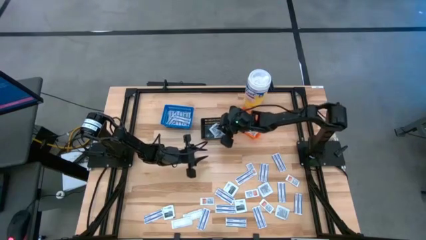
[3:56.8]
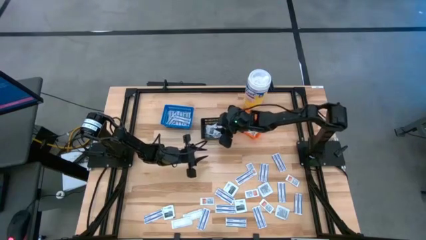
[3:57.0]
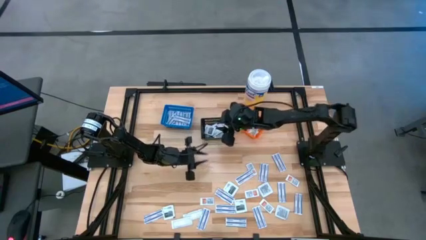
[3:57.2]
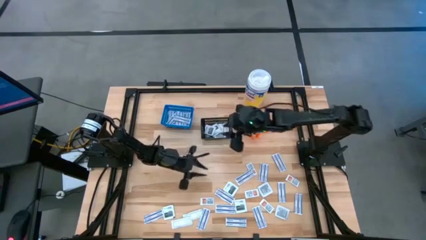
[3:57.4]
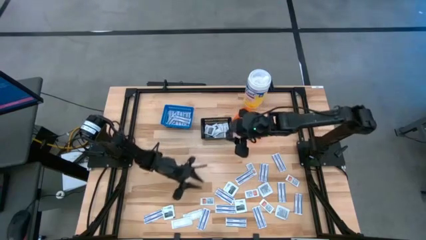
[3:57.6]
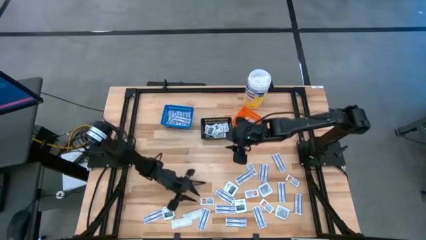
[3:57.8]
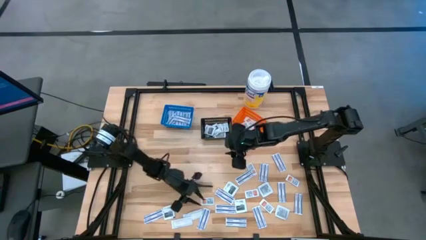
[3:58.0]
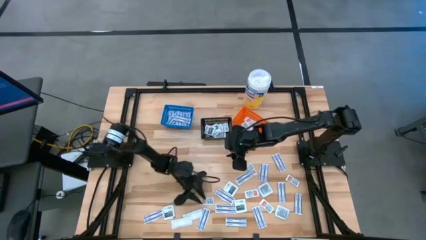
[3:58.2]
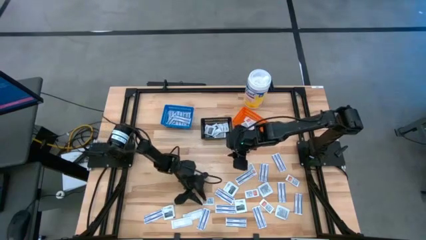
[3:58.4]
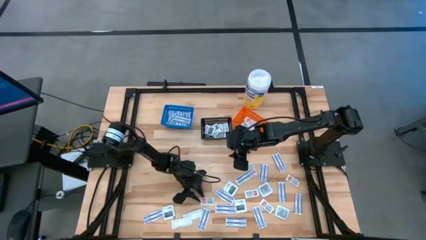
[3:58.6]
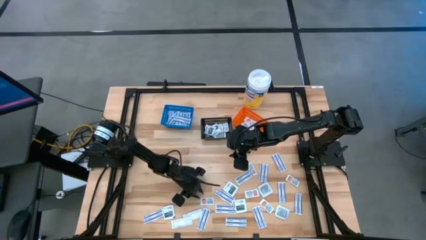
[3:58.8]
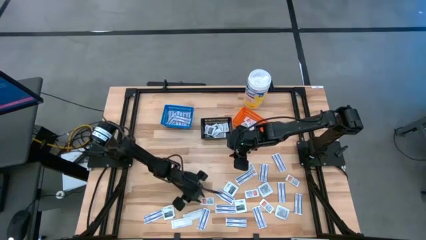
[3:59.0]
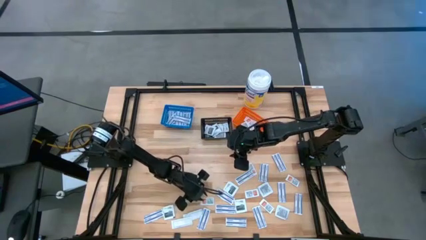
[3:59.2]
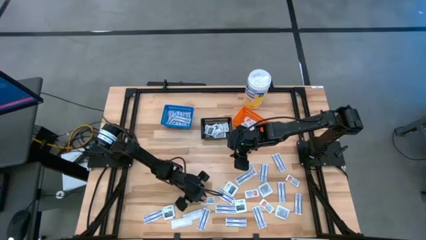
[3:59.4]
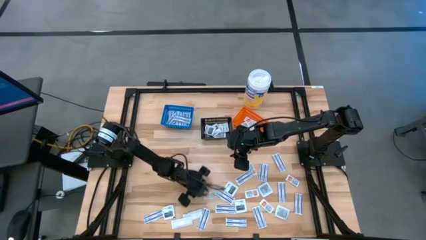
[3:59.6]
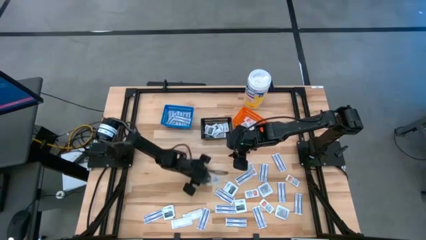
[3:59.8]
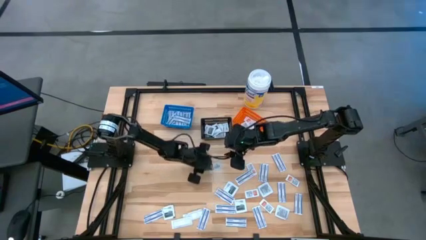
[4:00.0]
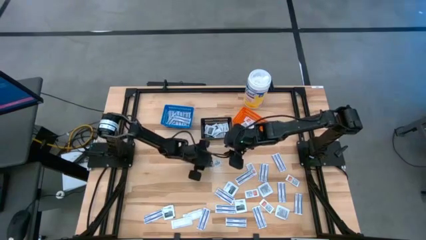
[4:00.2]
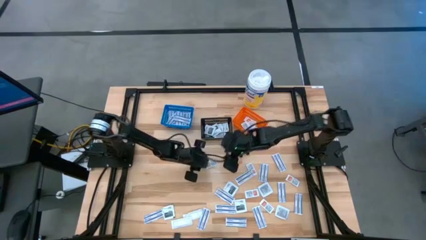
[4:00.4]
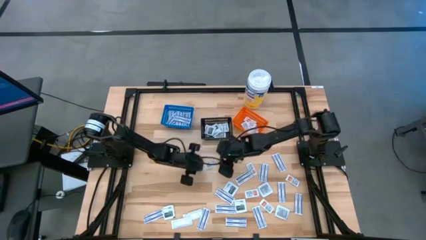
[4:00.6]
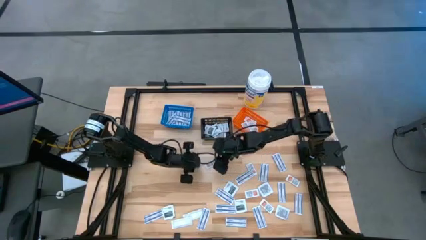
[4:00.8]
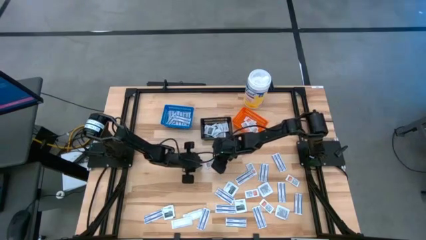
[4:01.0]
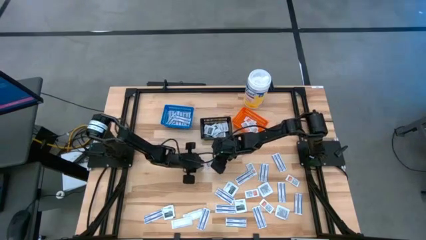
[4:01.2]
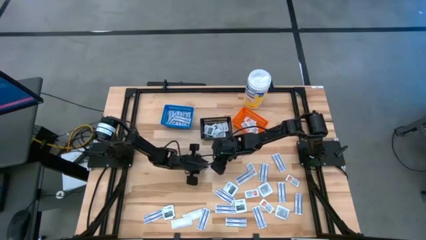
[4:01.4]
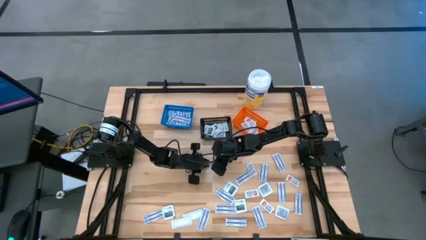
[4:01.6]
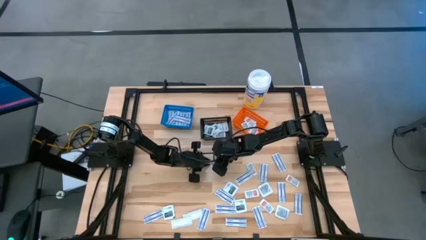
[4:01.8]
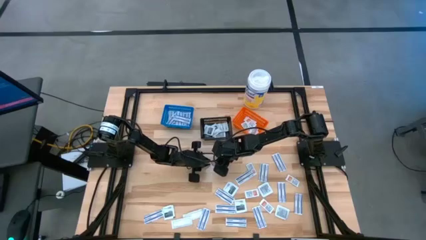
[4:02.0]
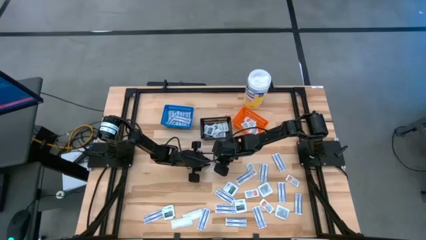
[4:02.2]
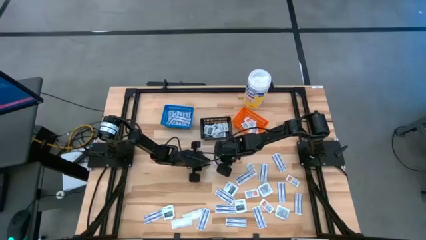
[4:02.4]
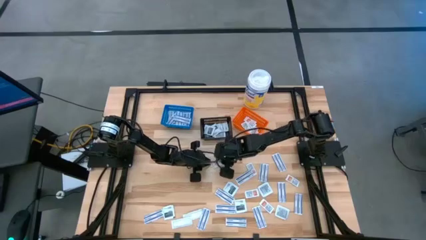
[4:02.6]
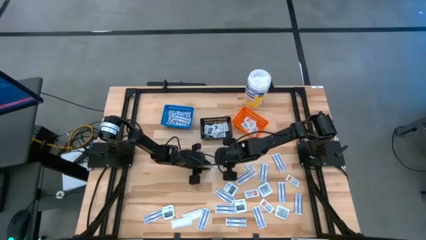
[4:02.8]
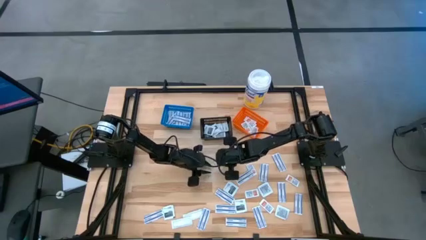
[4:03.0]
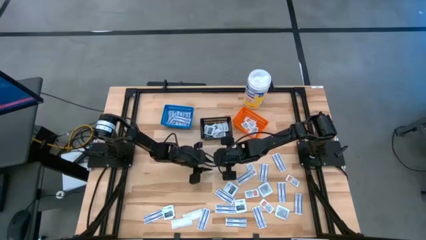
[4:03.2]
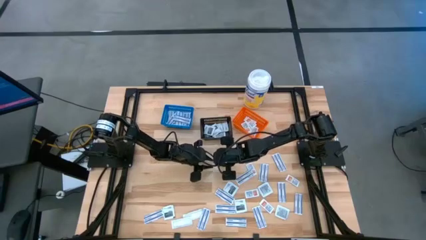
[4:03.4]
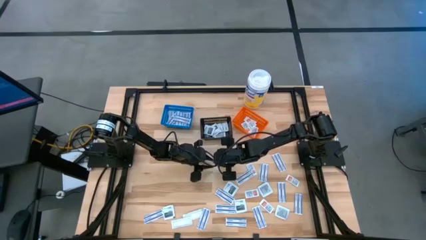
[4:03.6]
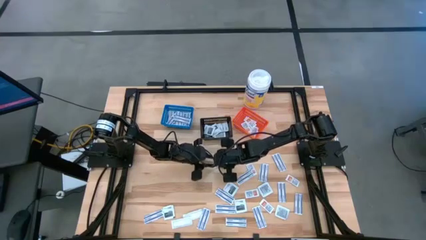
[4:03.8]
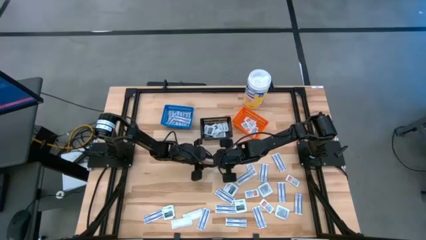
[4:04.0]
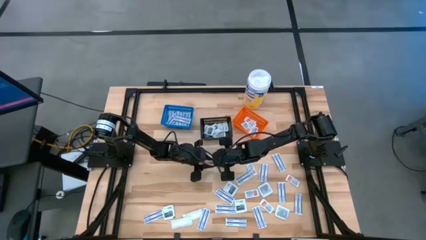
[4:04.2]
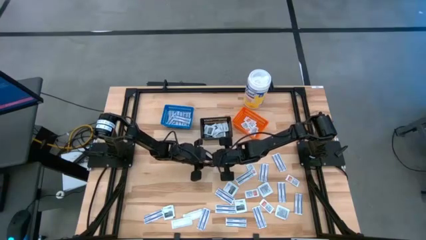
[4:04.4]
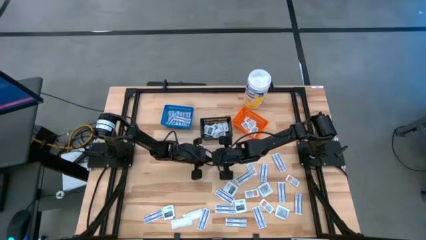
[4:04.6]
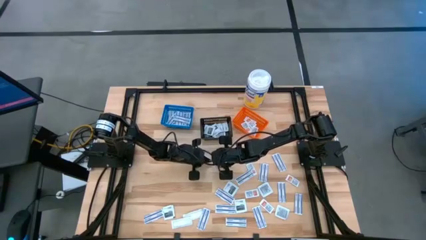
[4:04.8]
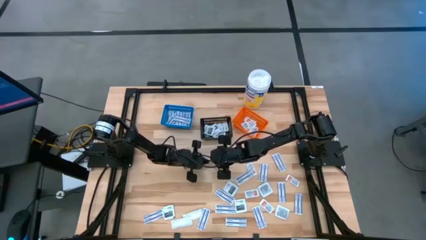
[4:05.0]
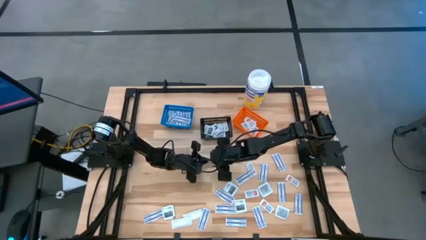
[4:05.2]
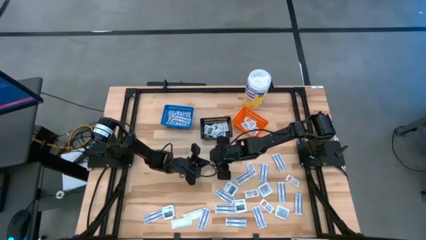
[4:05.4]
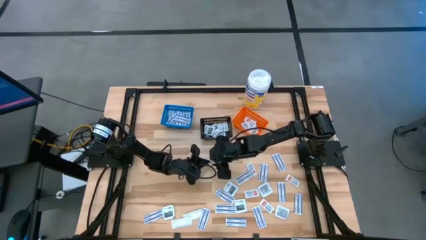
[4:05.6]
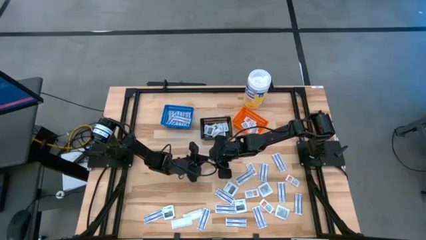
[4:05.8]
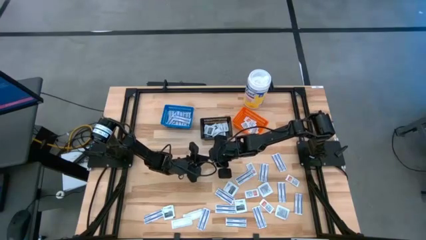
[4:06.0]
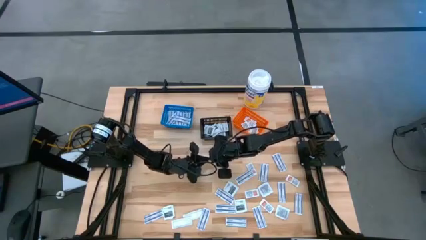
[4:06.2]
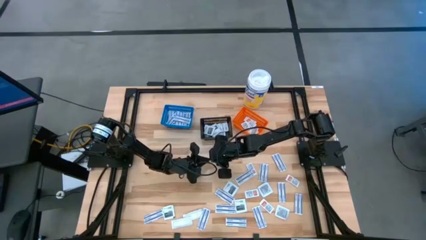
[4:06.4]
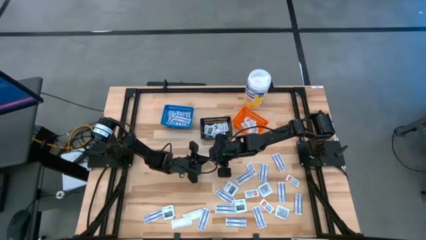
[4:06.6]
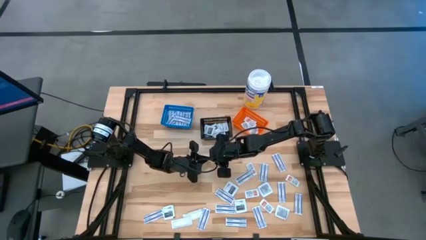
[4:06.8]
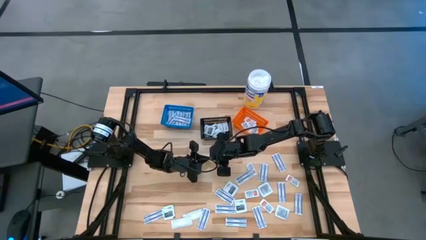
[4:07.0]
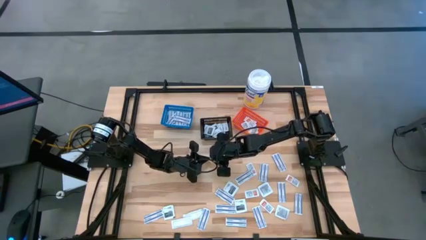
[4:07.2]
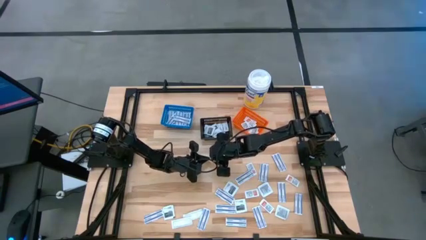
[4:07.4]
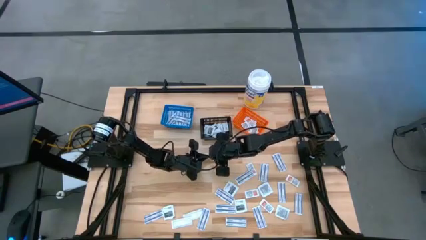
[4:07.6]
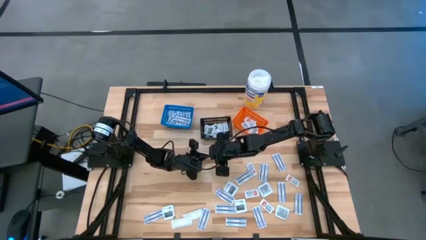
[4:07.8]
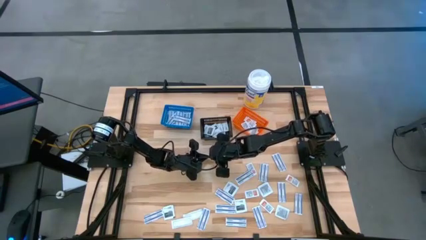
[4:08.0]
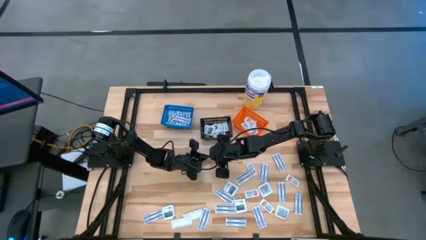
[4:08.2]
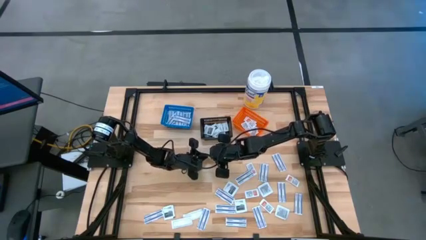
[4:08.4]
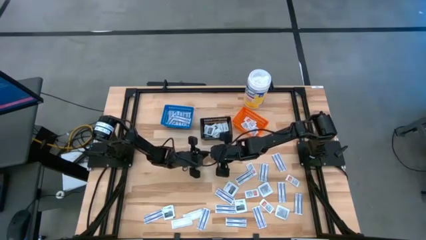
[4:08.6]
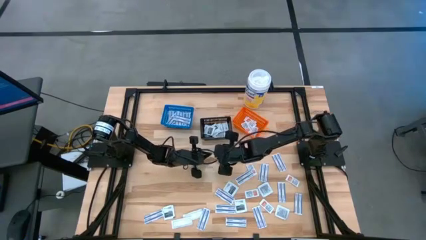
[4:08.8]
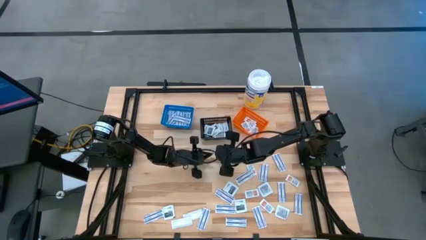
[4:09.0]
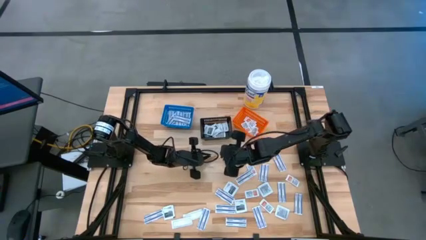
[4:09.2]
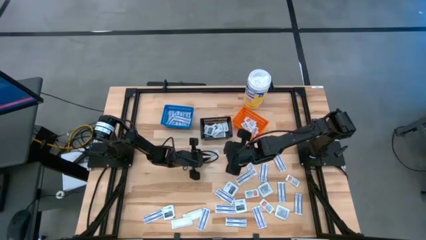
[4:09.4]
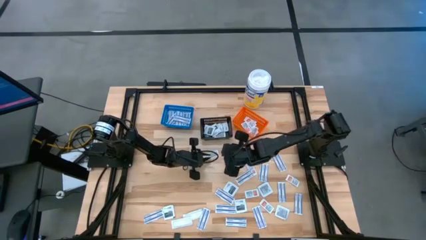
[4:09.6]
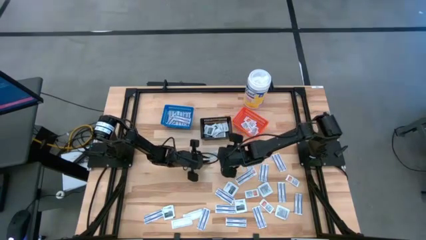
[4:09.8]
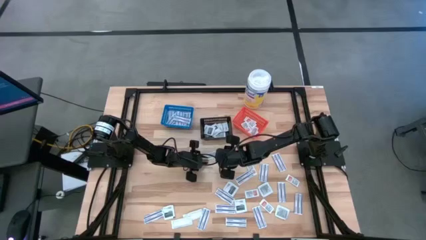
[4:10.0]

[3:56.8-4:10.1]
Task: Pick & Place First Aid Supplies
Put the ointment pack into the orange bin

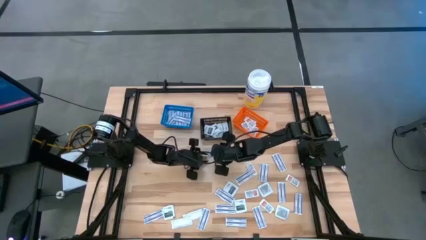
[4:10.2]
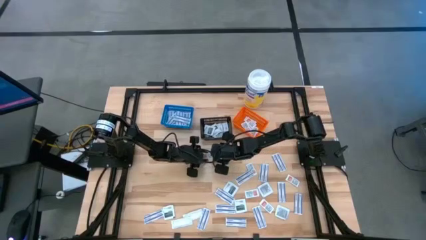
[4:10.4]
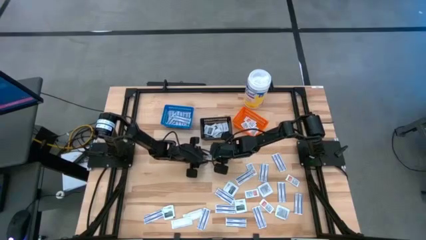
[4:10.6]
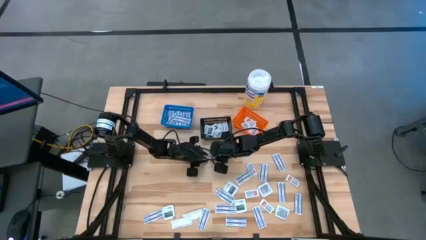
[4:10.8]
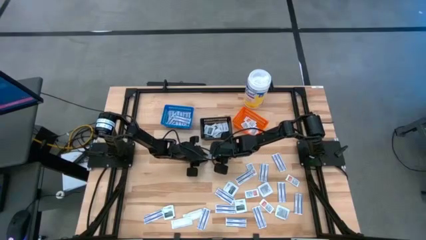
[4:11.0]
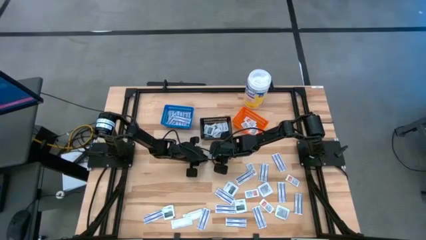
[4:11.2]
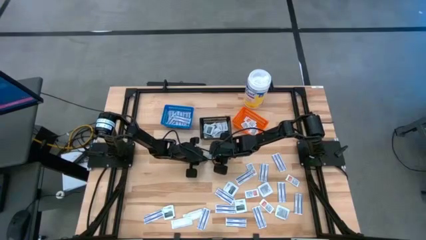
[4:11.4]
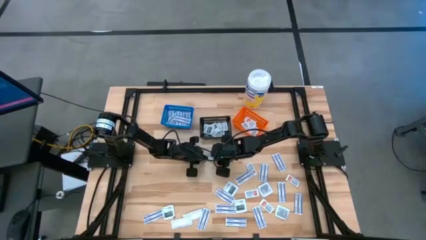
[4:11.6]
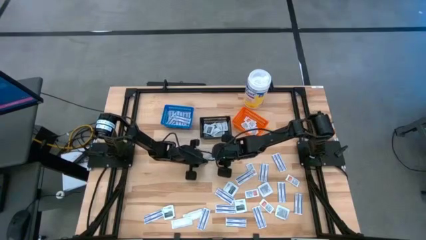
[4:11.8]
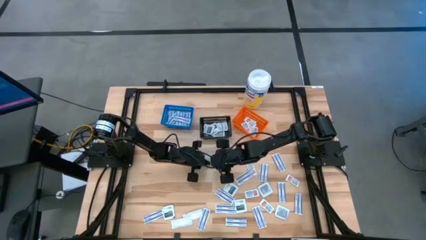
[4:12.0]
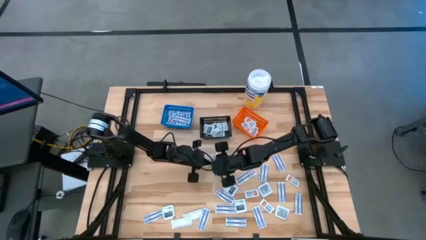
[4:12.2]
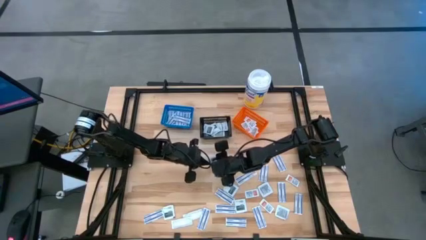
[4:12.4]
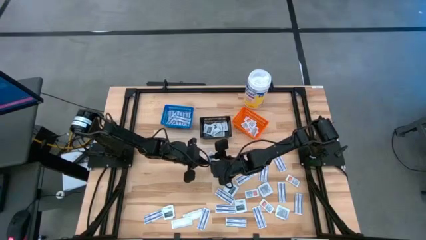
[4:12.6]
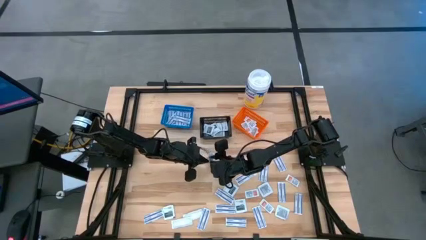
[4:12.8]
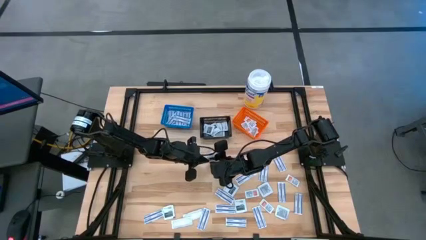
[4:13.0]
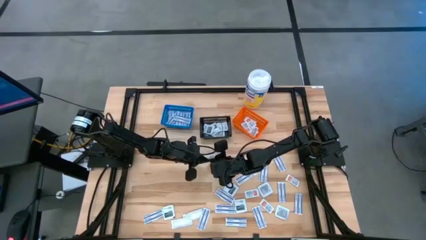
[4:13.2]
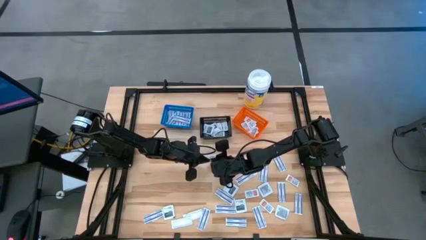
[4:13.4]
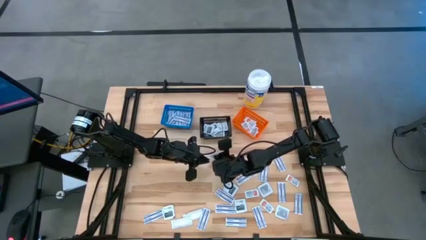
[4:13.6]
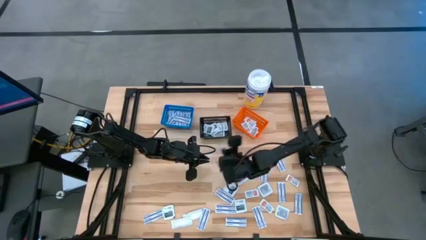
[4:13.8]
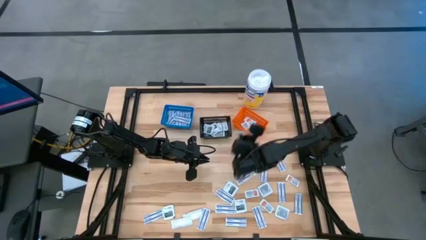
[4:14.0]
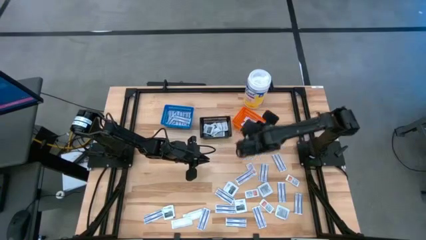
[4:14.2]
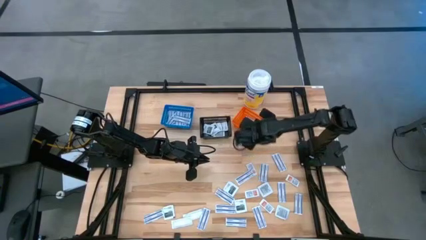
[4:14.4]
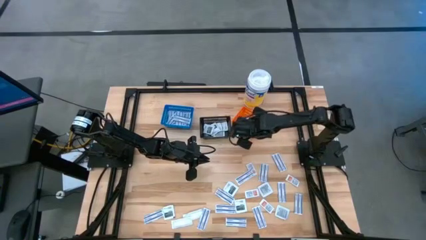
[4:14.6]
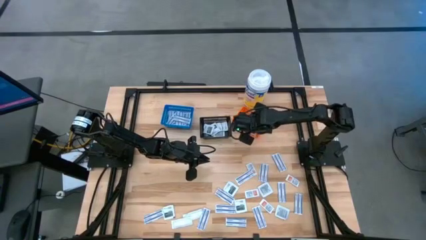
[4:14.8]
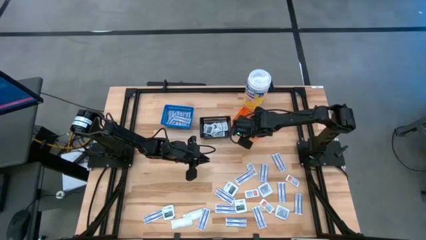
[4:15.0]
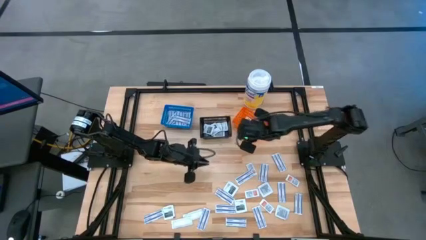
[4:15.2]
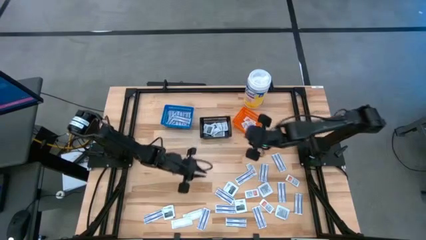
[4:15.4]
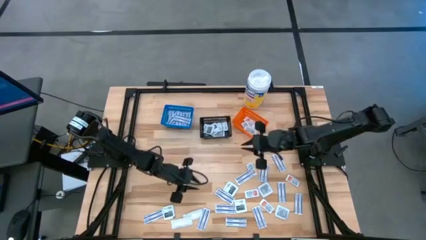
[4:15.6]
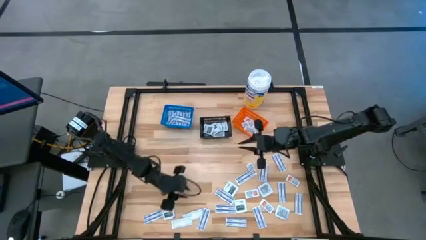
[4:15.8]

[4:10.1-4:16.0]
Put the ointment pack into the orange bin
